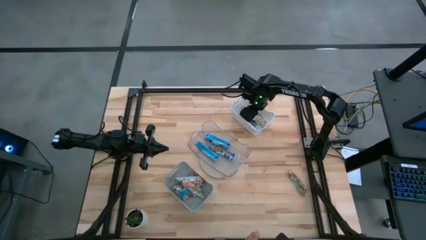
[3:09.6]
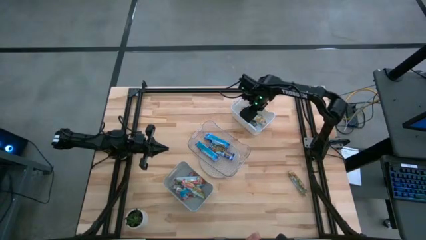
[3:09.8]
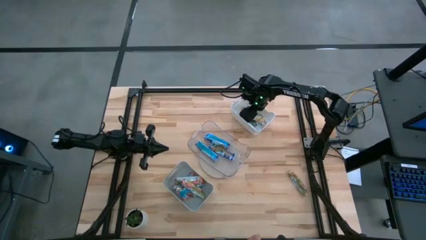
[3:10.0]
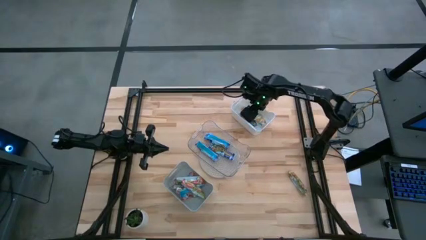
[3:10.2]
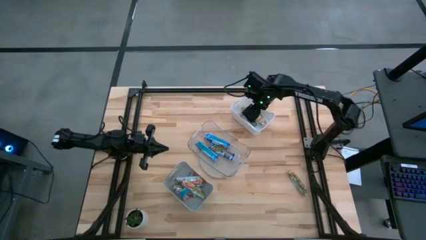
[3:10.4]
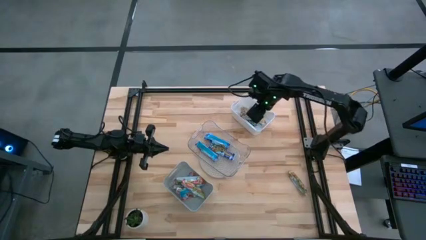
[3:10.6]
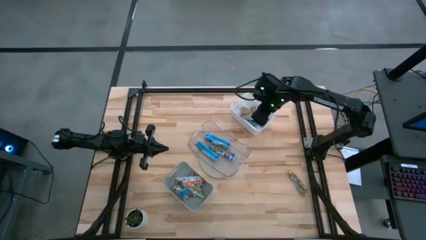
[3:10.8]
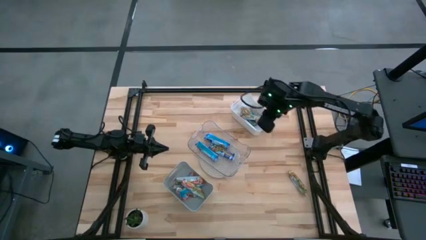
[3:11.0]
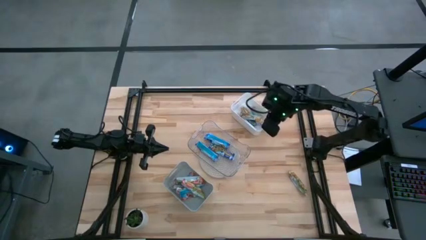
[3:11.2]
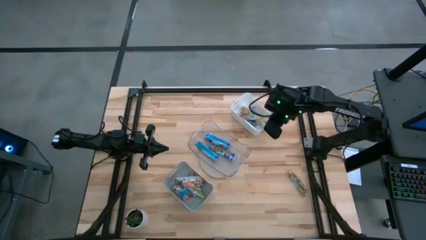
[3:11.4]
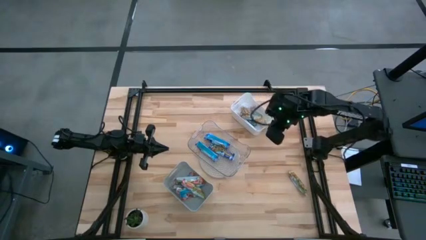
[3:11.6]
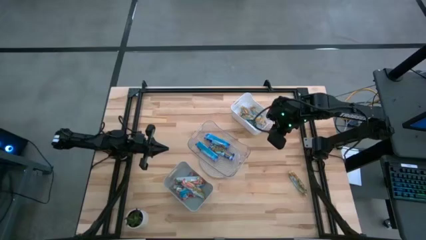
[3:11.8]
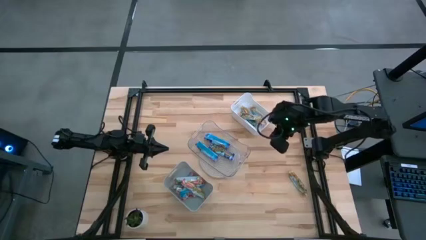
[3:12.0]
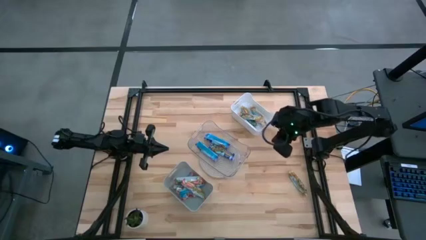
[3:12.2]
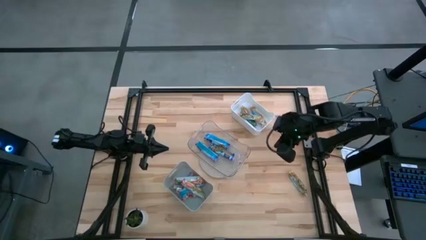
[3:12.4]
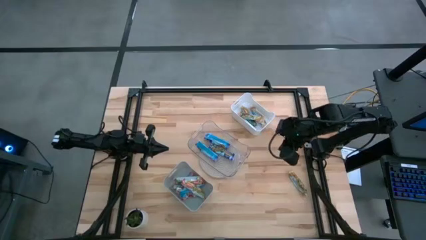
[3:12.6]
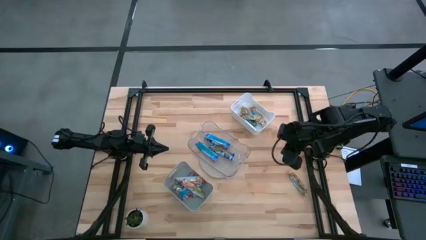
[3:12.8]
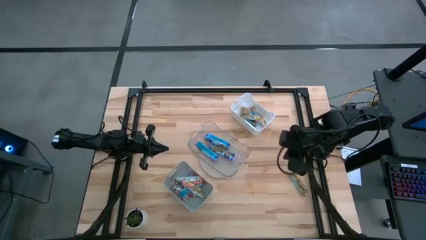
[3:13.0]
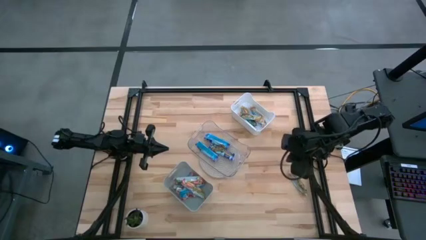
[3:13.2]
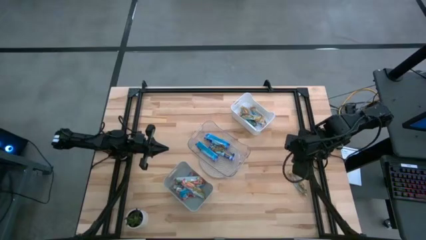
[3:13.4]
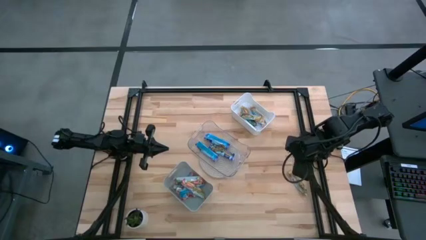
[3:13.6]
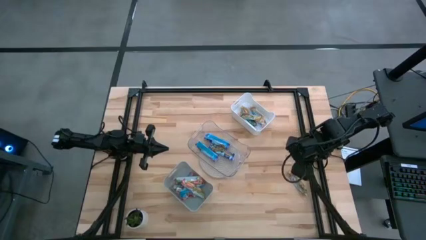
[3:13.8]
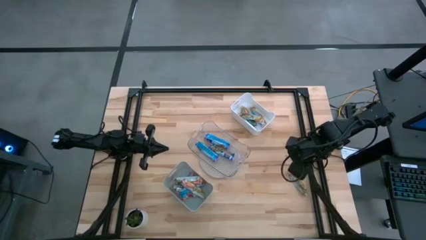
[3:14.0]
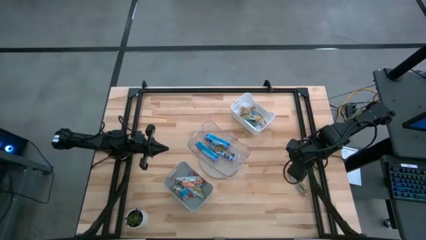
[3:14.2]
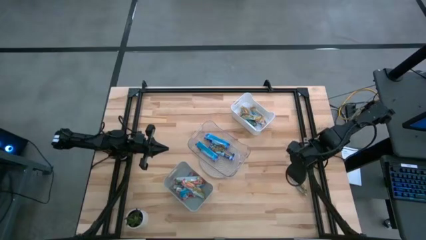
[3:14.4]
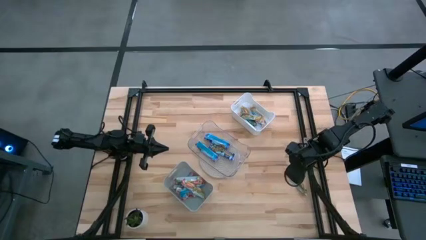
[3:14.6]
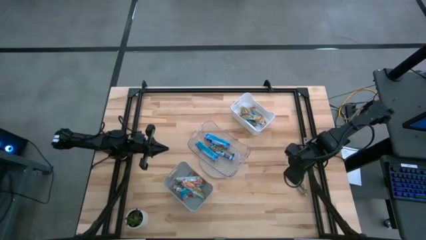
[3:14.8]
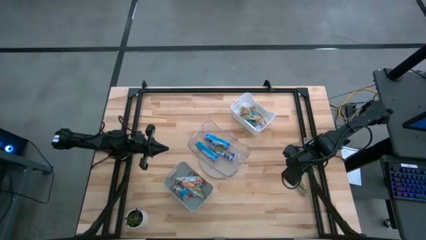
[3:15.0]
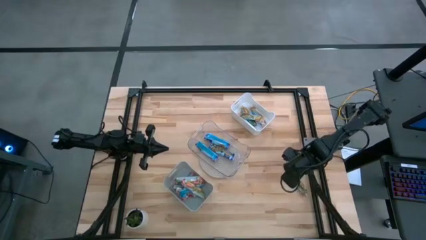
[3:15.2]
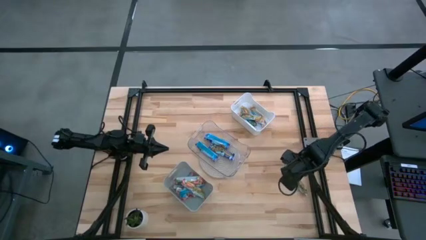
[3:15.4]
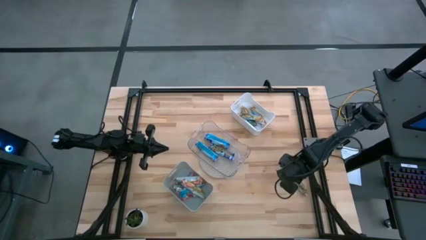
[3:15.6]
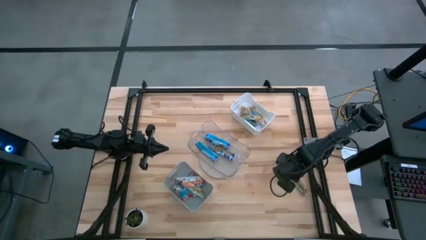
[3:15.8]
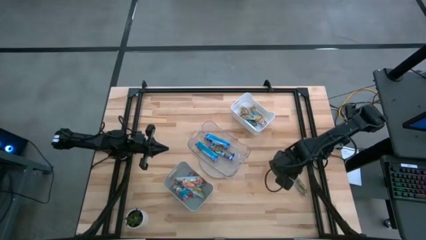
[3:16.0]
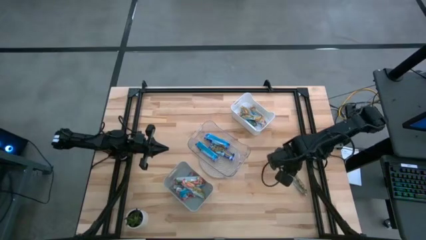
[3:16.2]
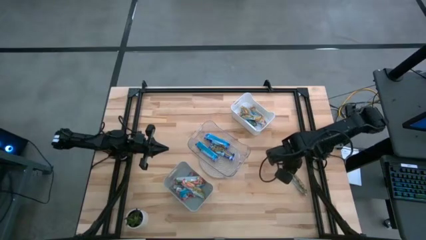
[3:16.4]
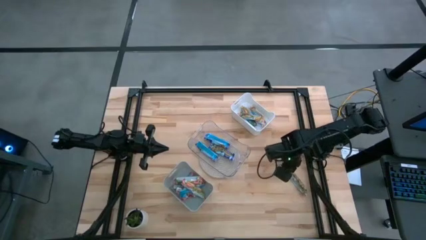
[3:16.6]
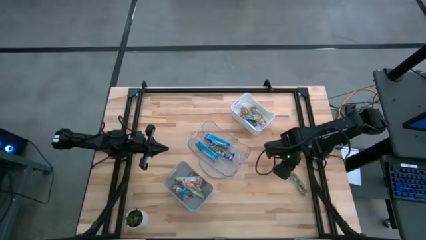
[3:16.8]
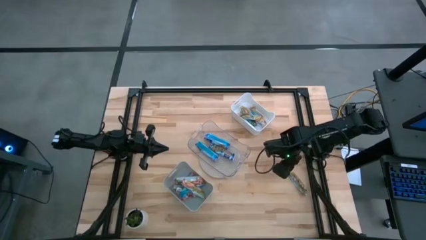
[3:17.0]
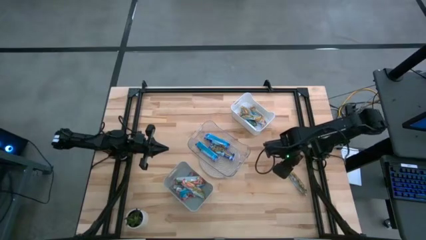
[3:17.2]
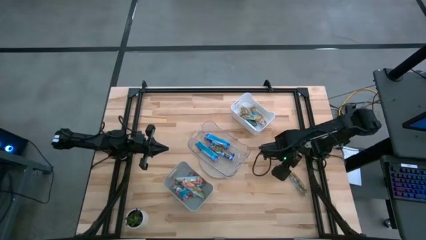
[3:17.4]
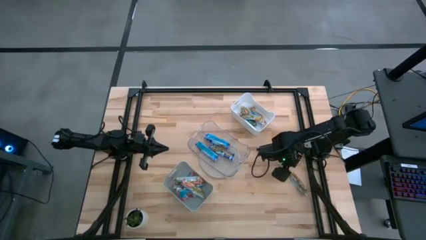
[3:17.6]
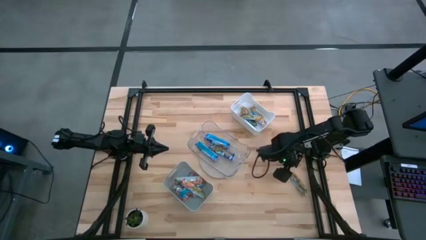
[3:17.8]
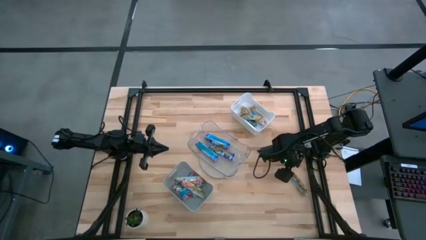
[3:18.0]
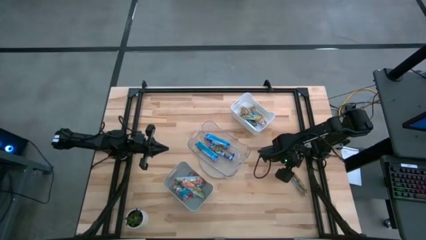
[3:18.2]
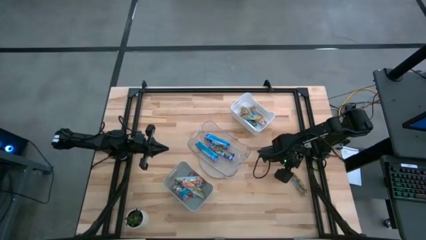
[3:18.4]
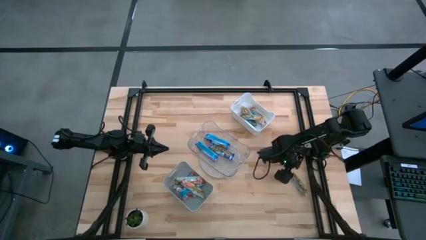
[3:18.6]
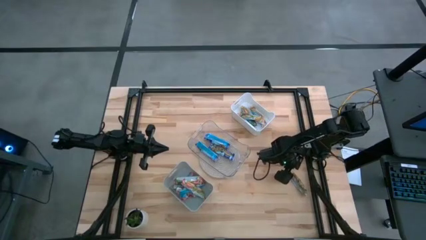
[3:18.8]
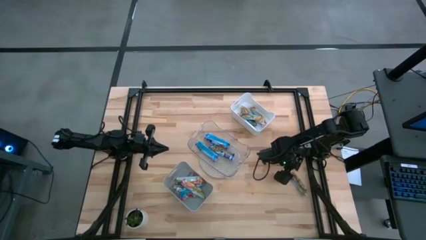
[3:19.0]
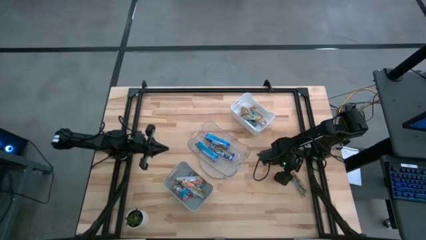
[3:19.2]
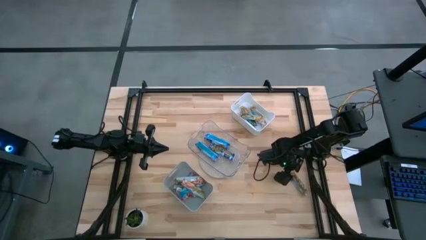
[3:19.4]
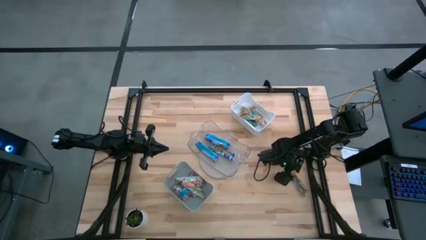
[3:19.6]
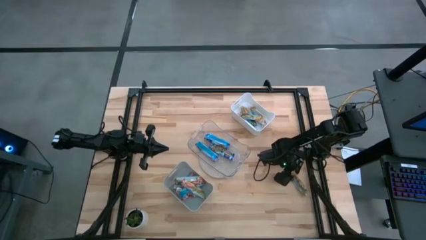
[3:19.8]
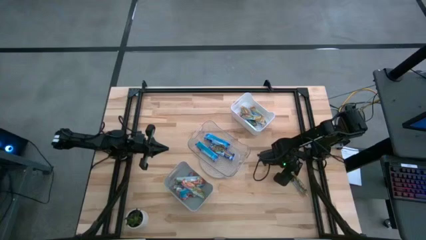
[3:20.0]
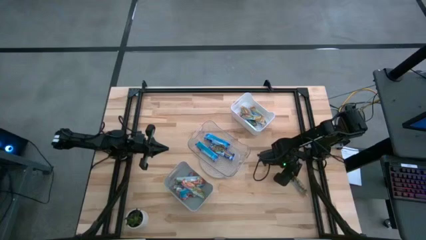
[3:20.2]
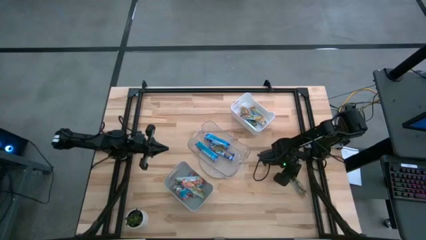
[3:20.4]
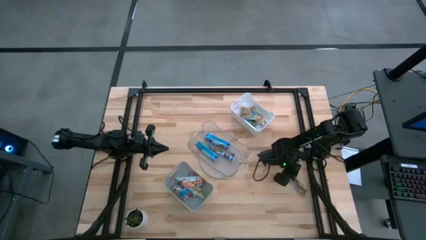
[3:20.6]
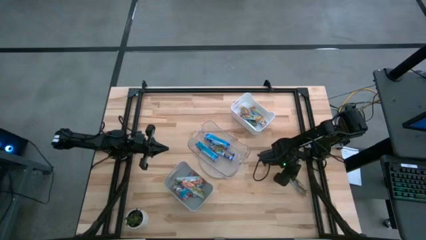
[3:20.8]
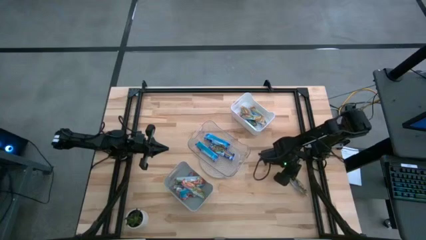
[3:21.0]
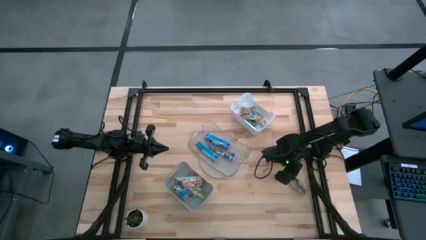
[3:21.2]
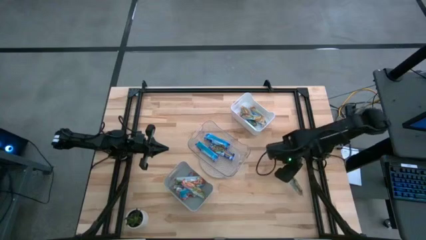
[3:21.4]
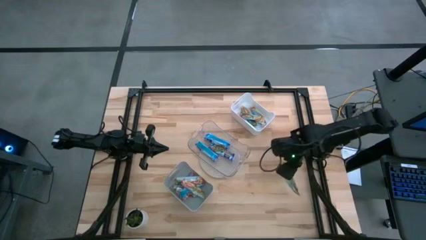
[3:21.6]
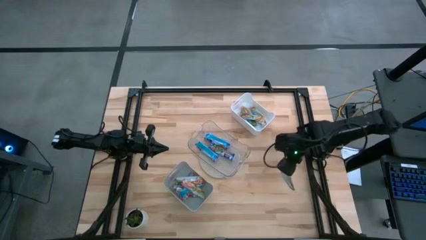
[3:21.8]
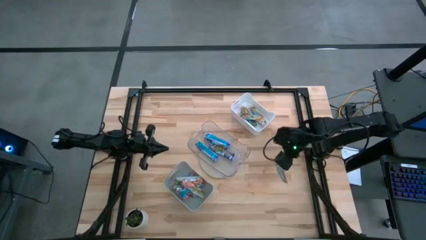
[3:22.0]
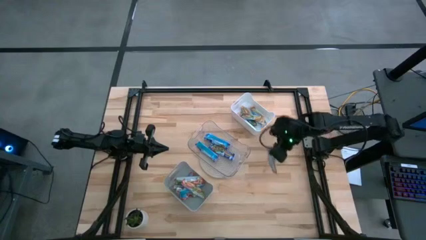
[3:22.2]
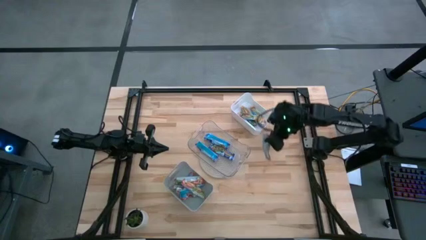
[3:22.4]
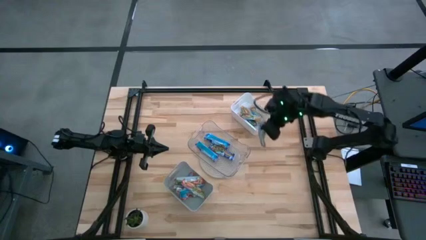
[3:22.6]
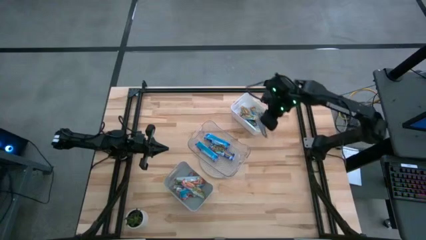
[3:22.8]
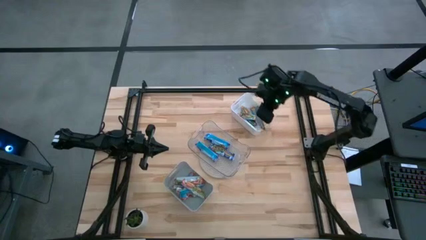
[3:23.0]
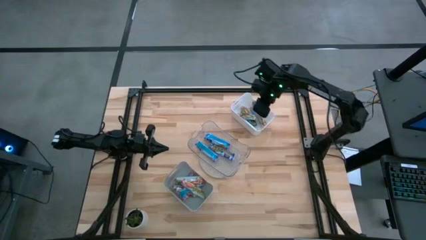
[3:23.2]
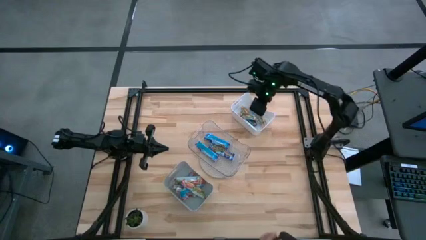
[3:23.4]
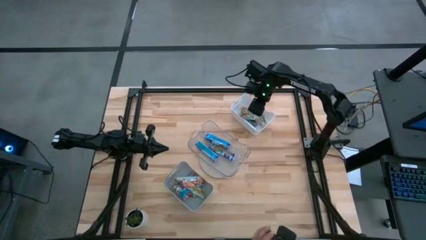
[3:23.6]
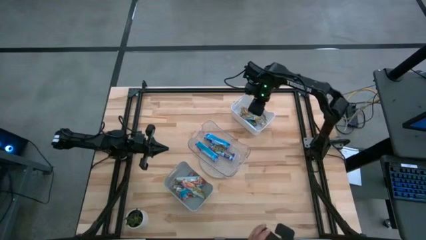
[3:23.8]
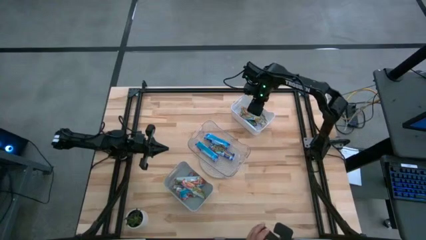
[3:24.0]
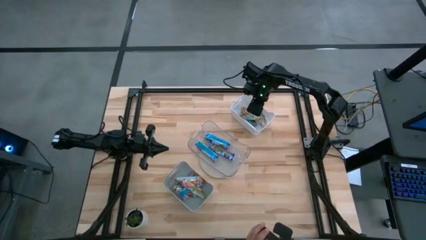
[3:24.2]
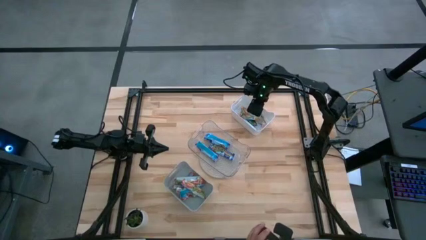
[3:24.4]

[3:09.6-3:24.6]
Task: Pick and place Granola Bars by type
Put the yellow granola bar into the white bin

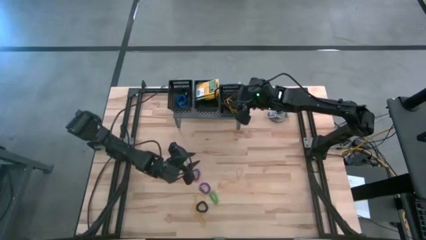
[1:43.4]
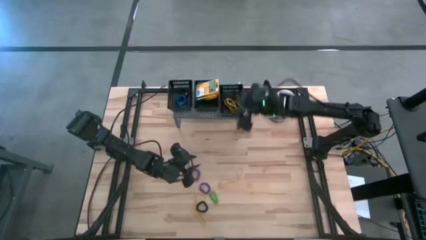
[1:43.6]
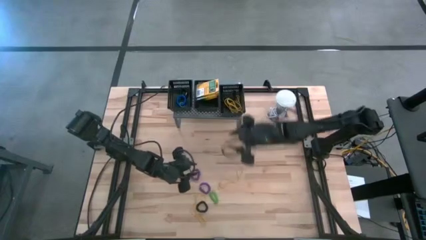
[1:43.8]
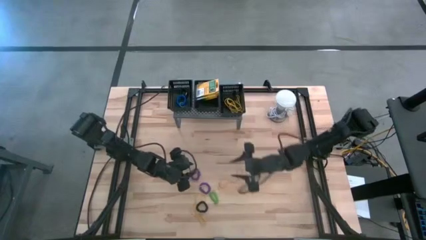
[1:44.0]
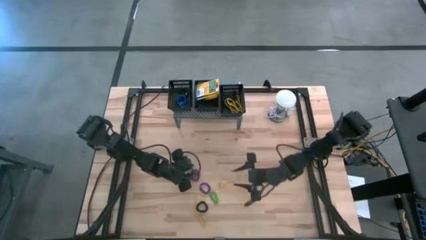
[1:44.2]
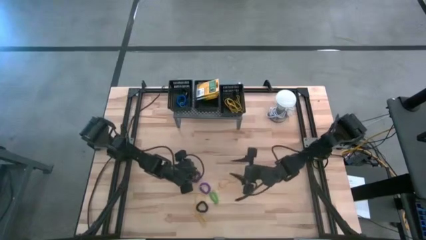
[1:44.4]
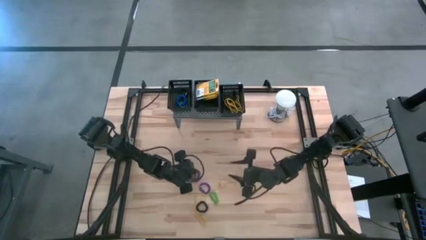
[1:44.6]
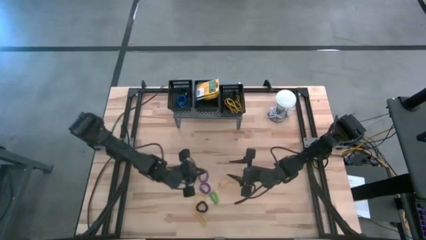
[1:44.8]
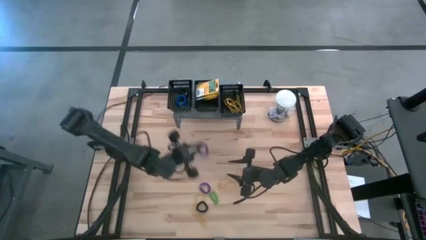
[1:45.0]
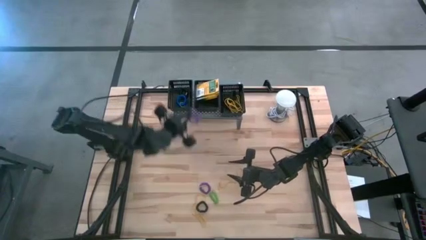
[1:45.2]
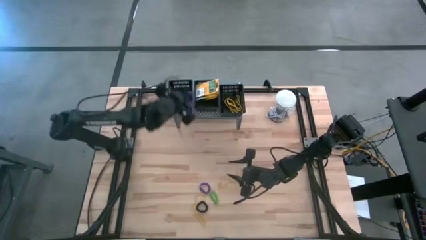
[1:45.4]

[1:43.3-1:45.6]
Task: Pick & Place Office Desk Supplies
Put the violet spring keychain into the left black bin on the shelf
